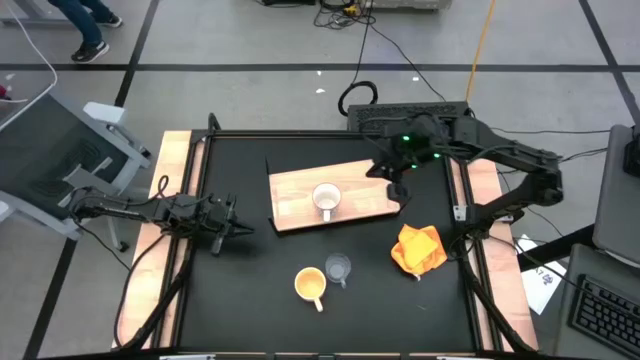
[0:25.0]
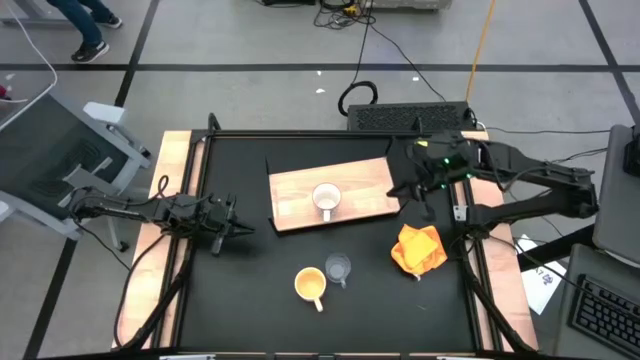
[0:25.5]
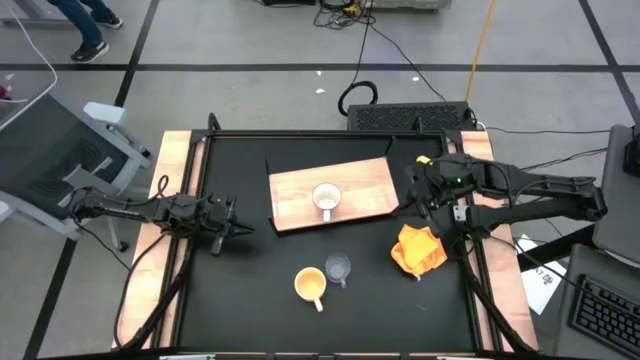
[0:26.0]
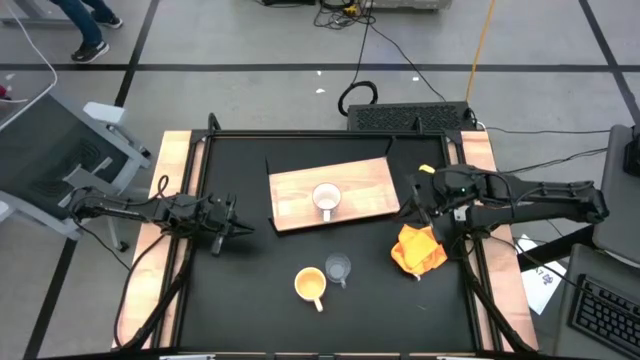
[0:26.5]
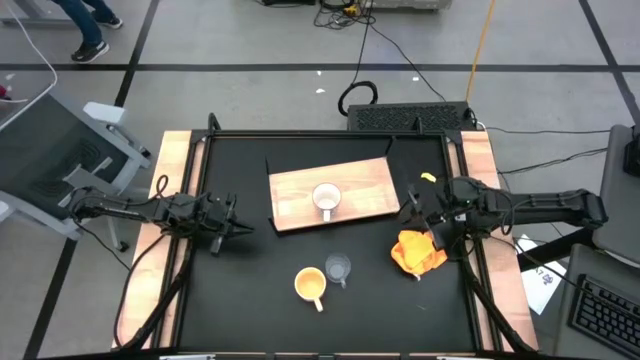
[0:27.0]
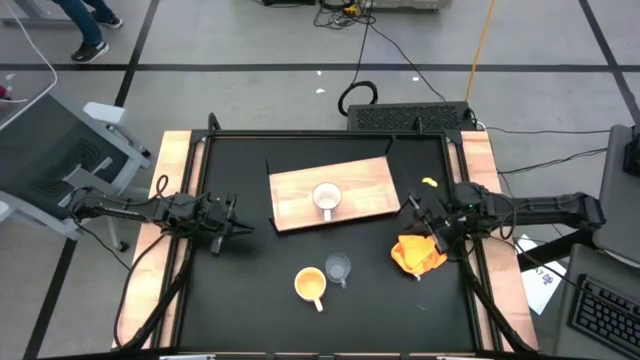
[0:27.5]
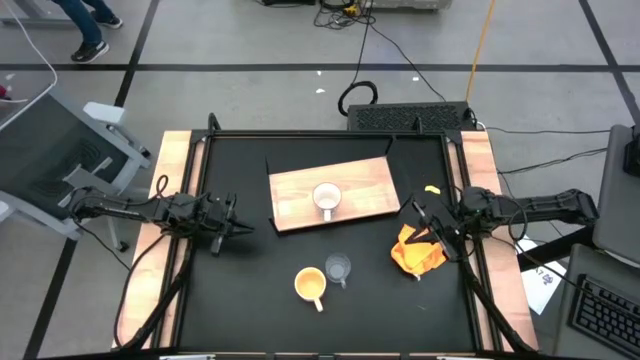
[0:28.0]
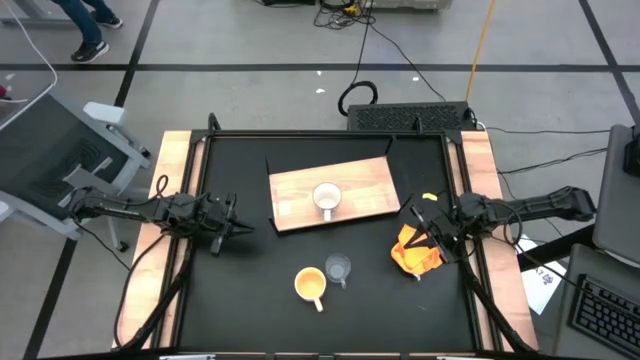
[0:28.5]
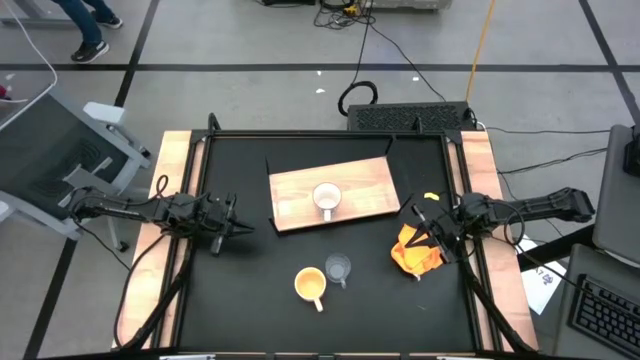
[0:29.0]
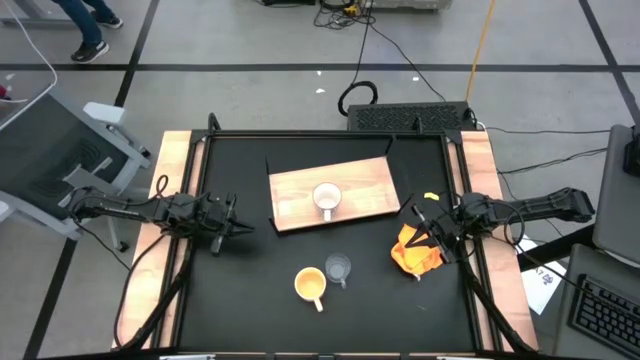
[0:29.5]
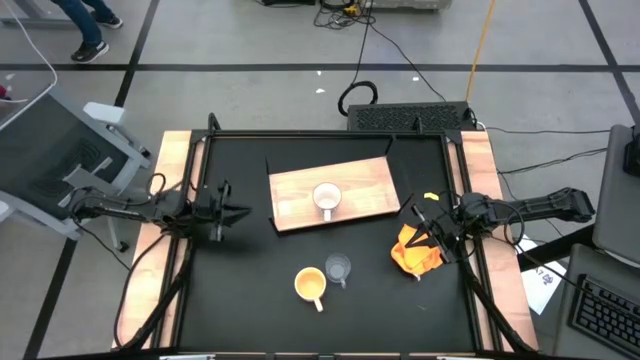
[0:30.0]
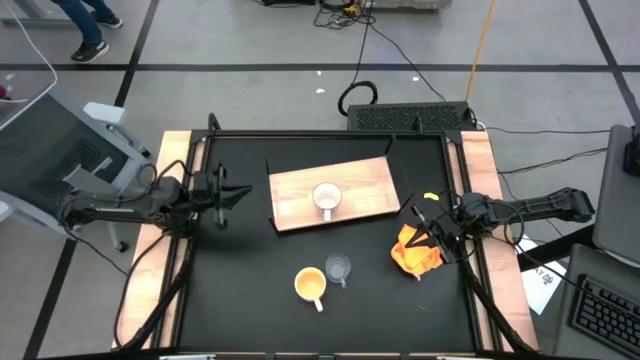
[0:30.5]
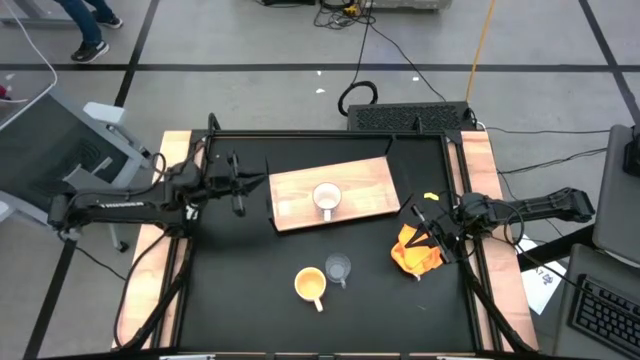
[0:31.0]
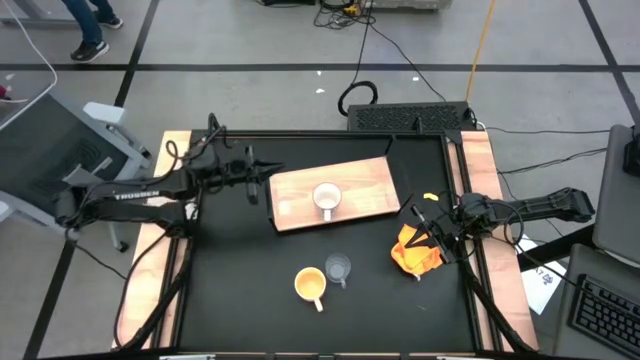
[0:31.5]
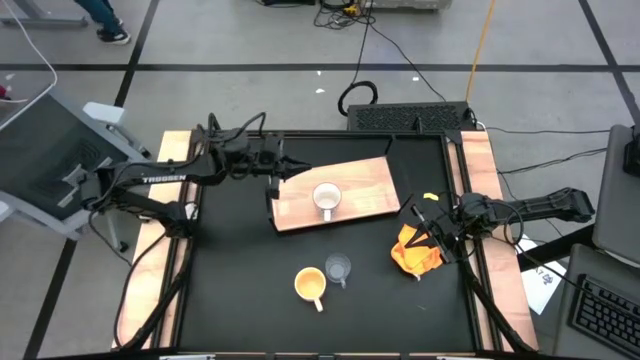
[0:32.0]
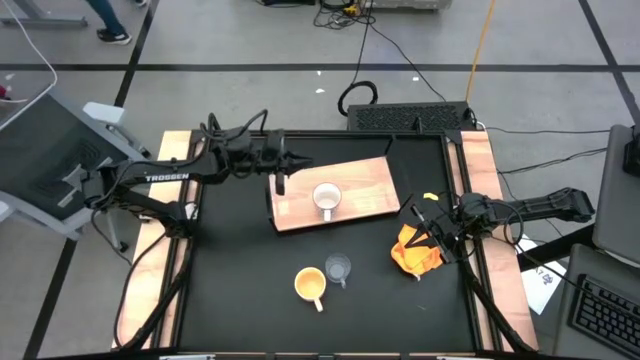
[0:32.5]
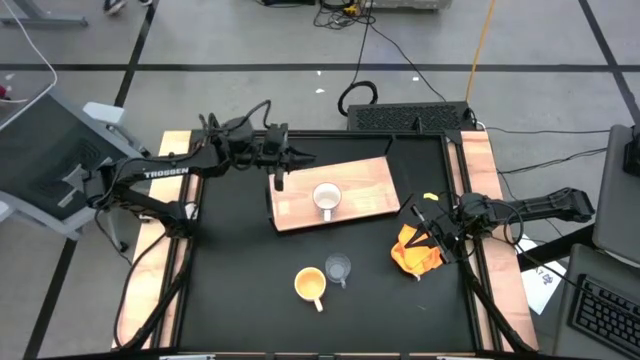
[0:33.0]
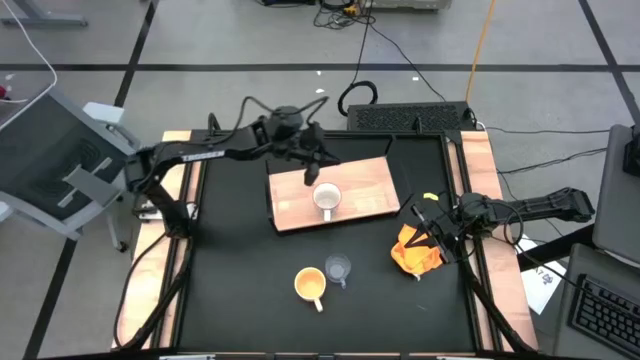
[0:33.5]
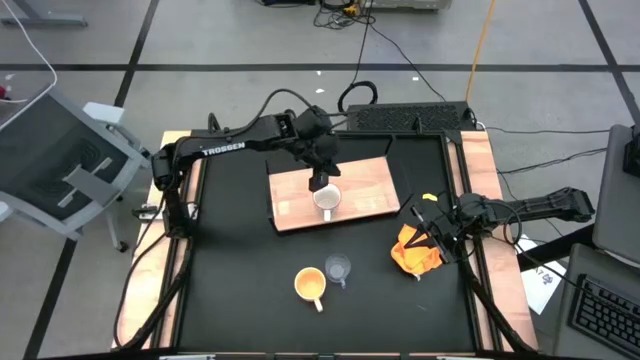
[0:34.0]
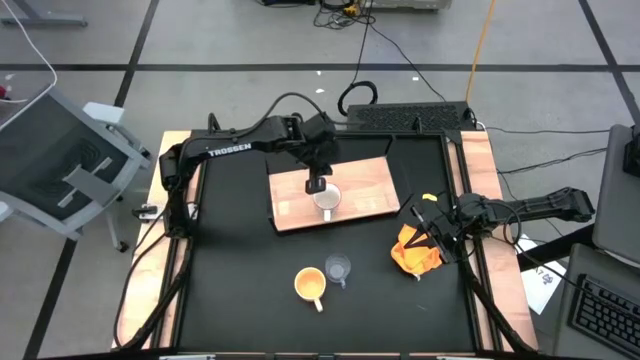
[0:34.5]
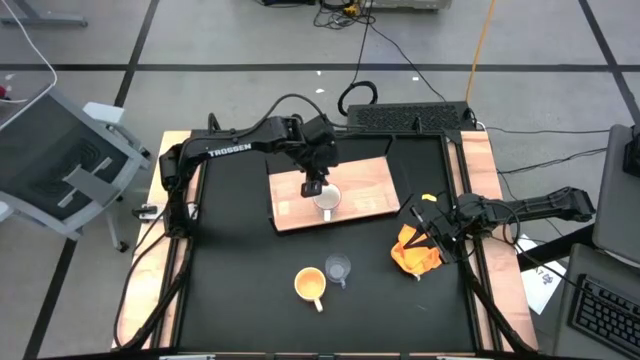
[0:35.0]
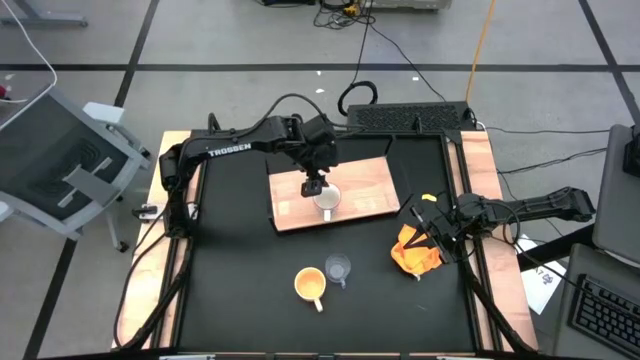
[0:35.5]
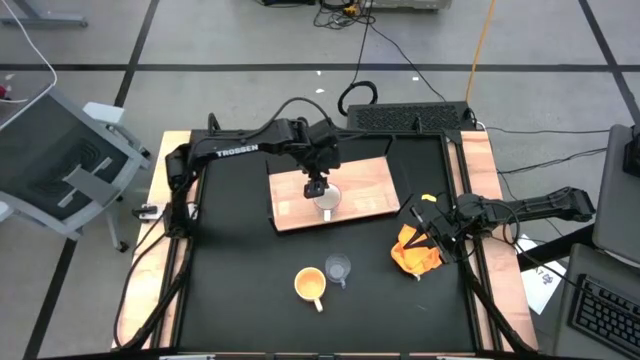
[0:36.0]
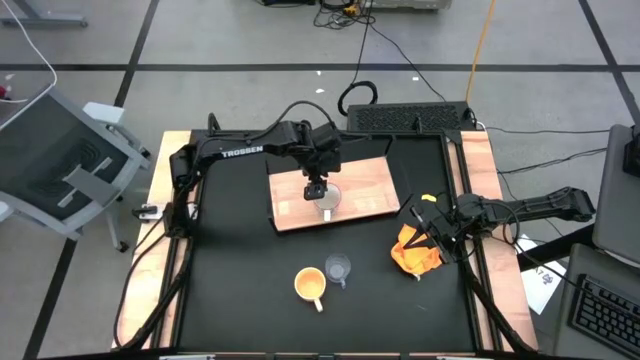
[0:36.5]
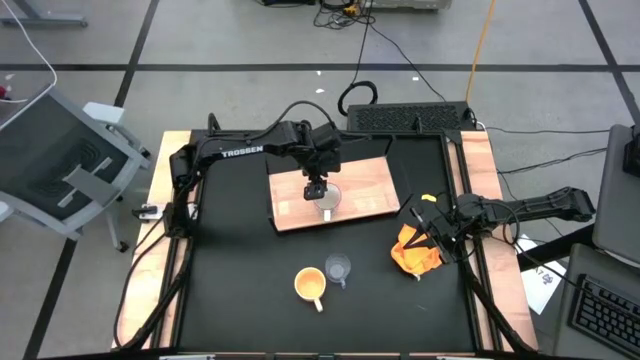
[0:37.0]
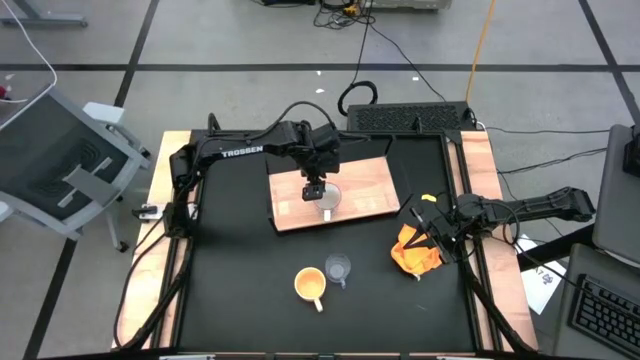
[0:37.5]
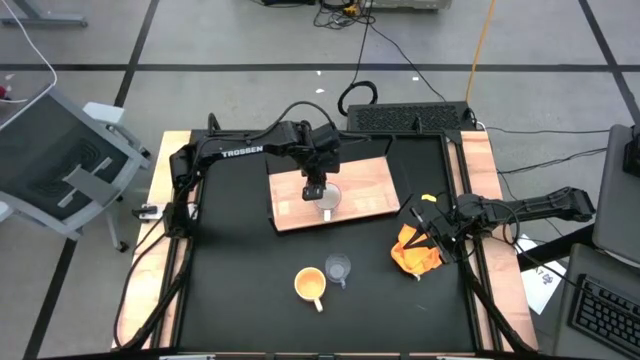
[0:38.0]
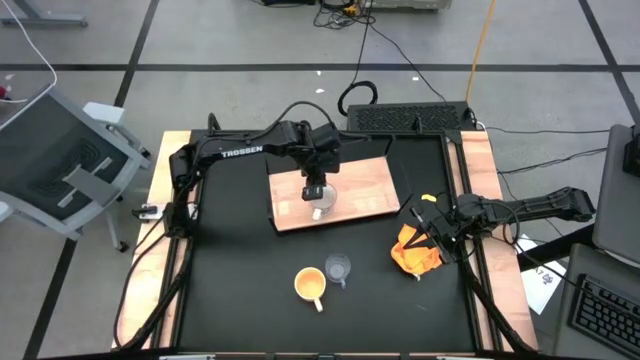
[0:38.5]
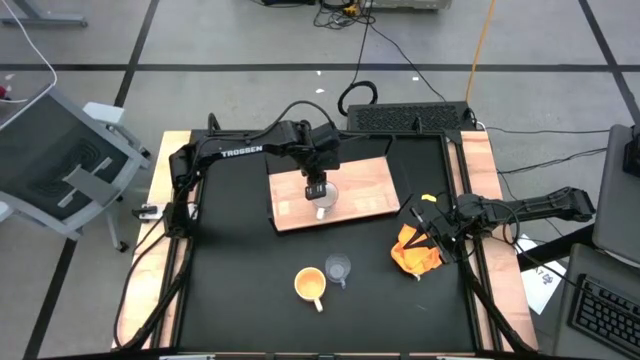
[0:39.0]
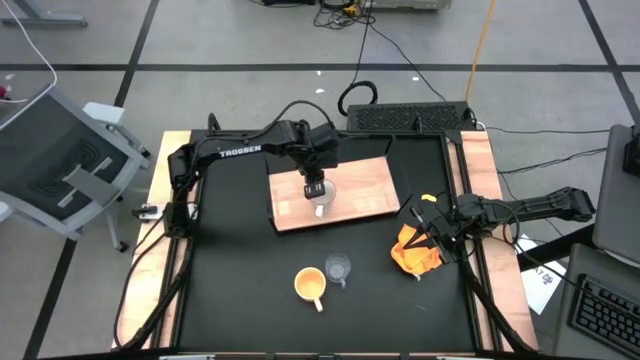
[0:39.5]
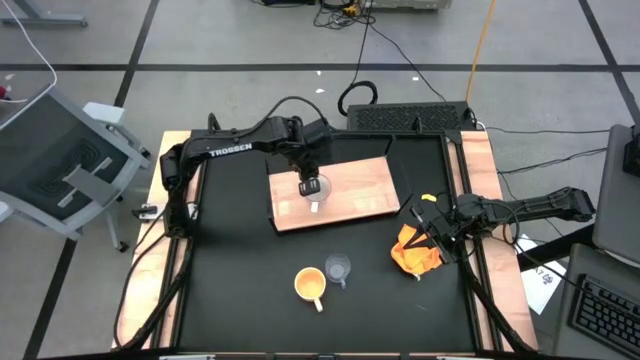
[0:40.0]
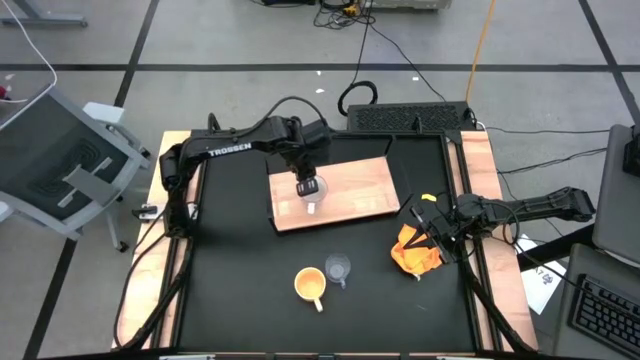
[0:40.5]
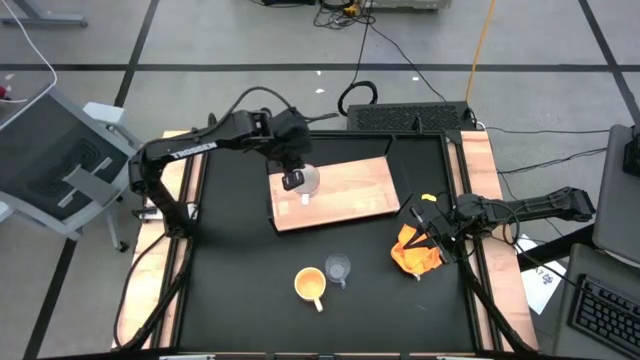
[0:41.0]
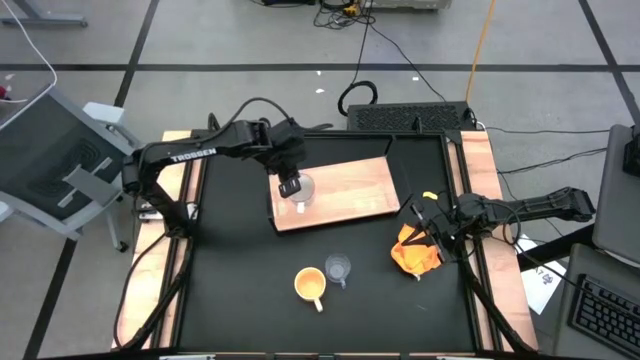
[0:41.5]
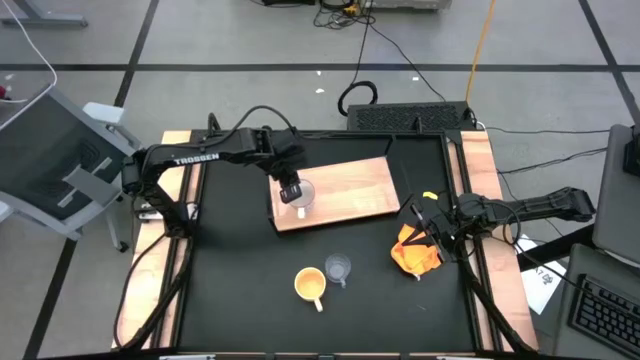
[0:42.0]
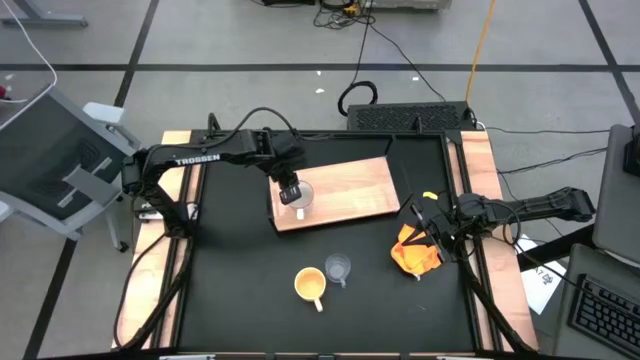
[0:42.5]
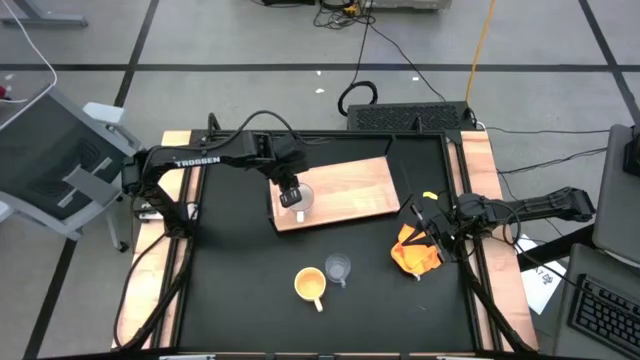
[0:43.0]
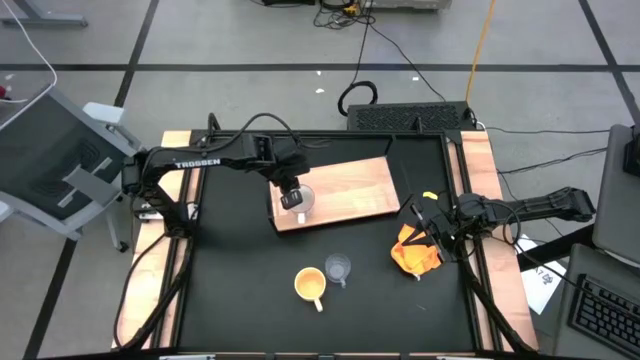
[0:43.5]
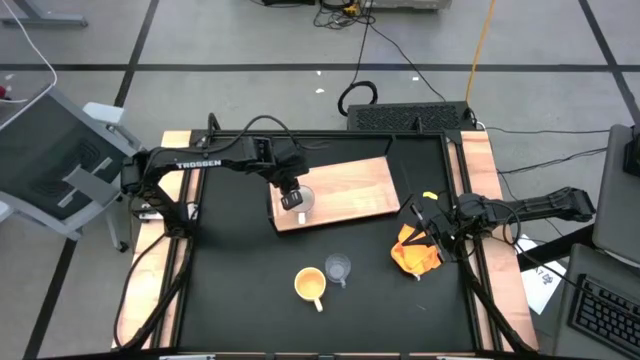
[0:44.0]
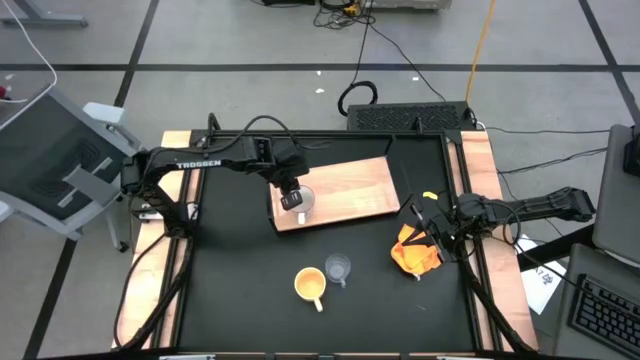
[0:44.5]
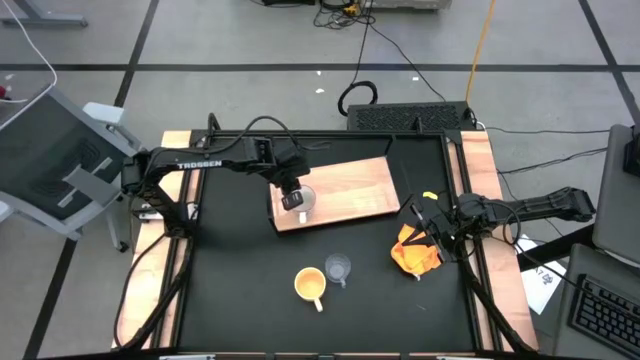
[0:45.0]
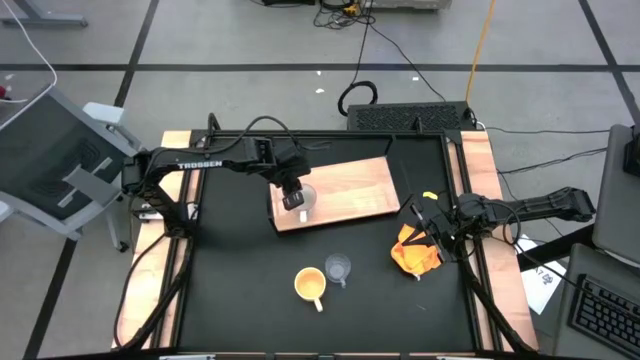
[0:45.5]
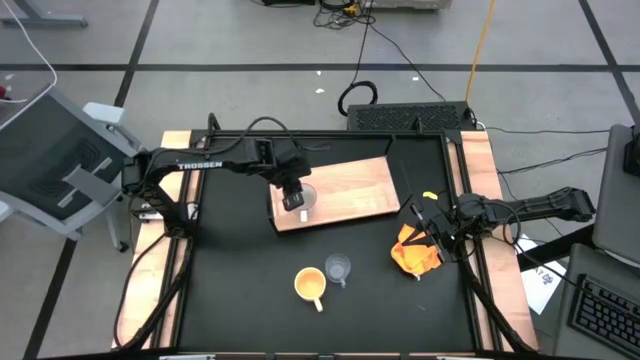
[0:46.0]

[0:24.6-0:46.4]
Task: Stack small to large cups/mugs on shelf
Put the gray patterned mug on the shelf
